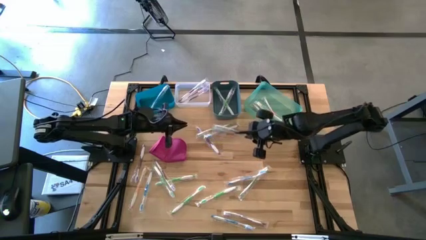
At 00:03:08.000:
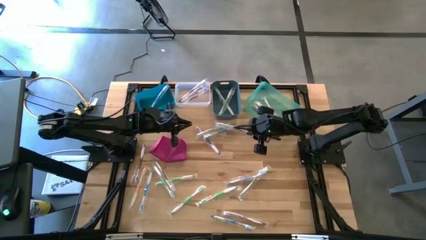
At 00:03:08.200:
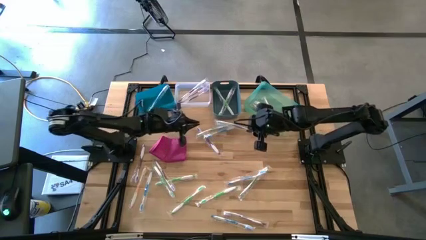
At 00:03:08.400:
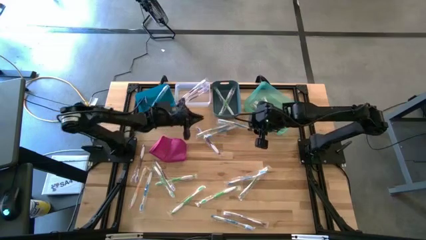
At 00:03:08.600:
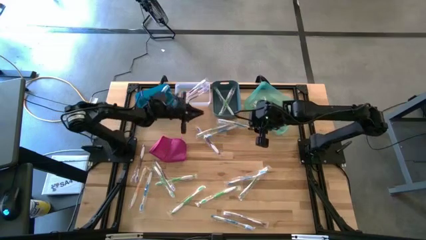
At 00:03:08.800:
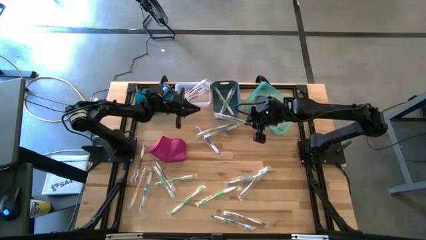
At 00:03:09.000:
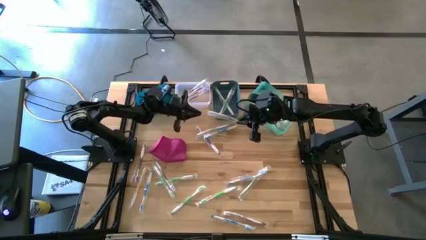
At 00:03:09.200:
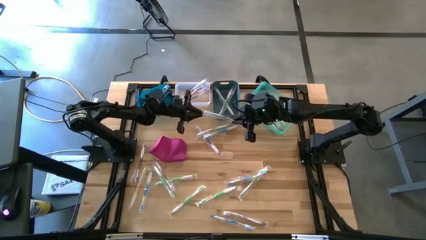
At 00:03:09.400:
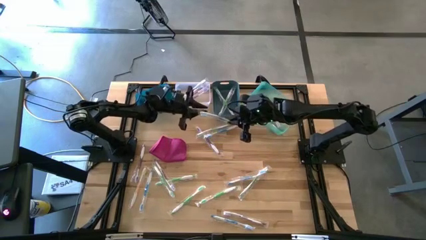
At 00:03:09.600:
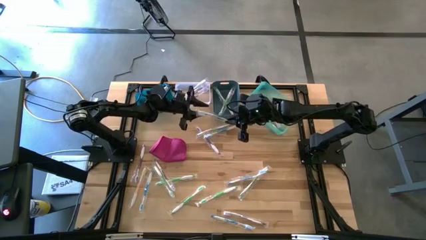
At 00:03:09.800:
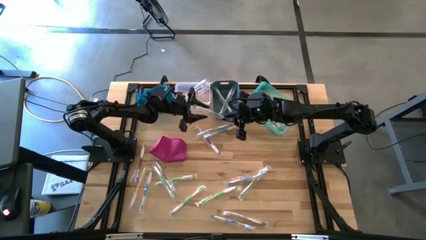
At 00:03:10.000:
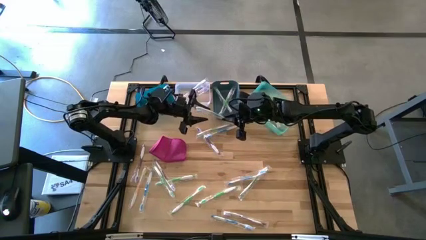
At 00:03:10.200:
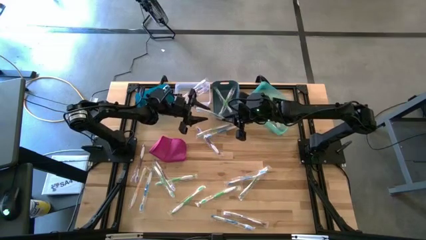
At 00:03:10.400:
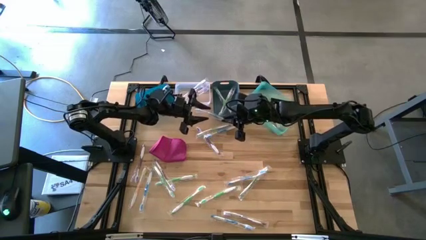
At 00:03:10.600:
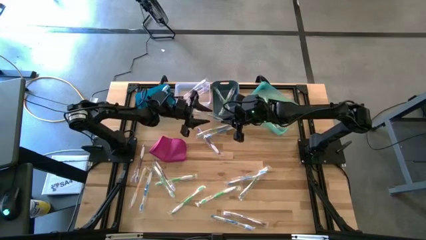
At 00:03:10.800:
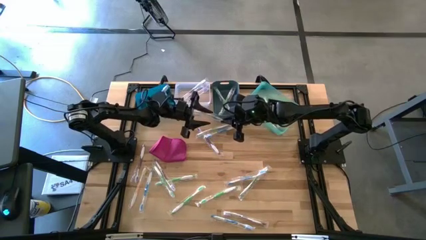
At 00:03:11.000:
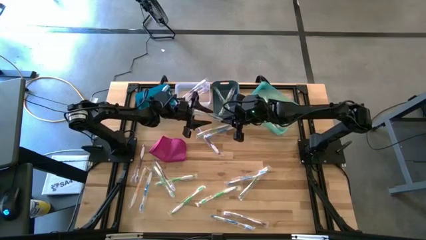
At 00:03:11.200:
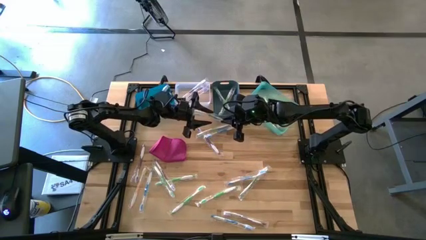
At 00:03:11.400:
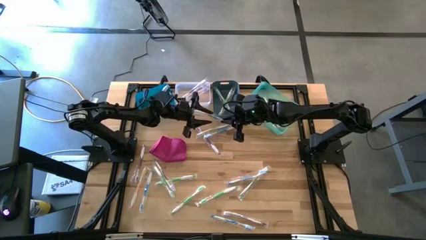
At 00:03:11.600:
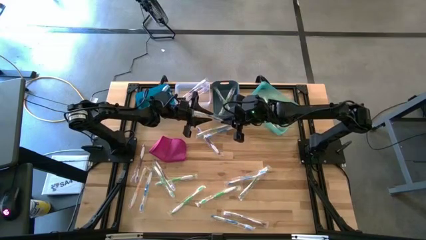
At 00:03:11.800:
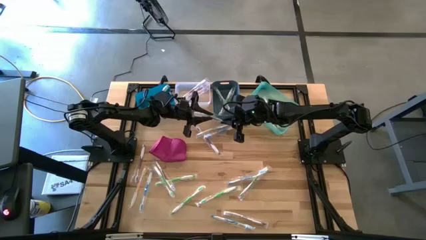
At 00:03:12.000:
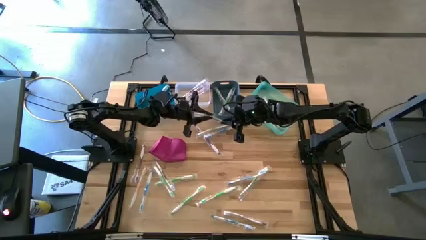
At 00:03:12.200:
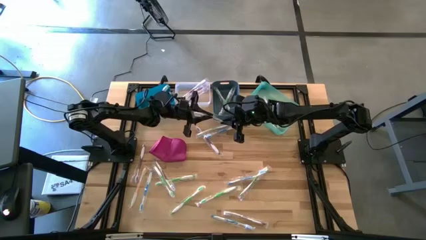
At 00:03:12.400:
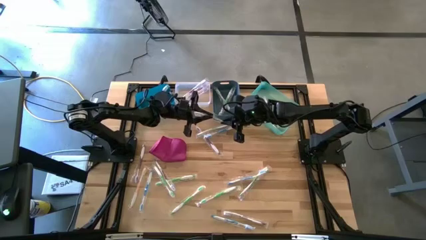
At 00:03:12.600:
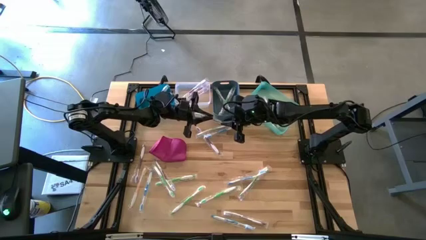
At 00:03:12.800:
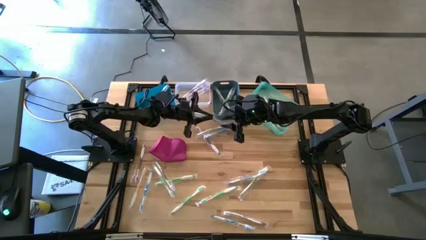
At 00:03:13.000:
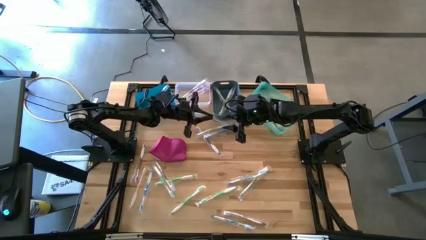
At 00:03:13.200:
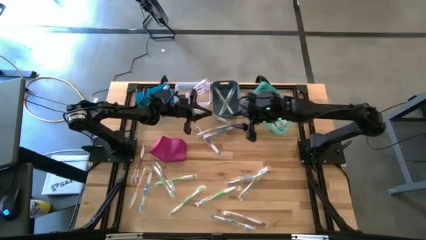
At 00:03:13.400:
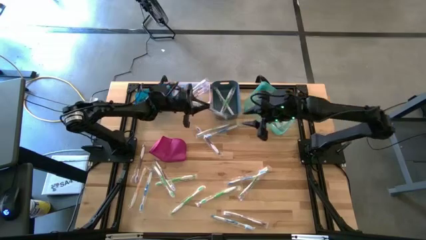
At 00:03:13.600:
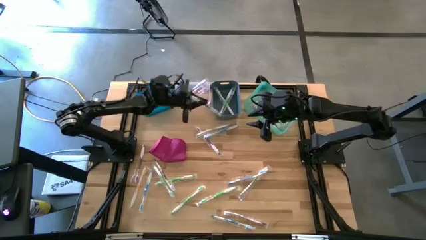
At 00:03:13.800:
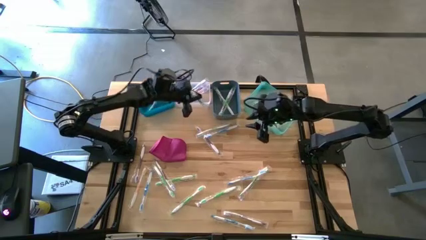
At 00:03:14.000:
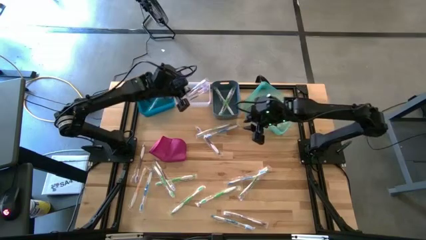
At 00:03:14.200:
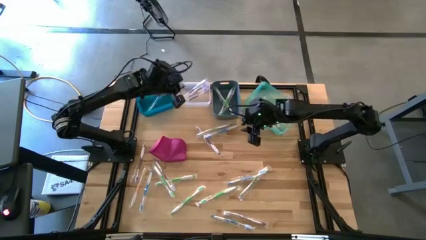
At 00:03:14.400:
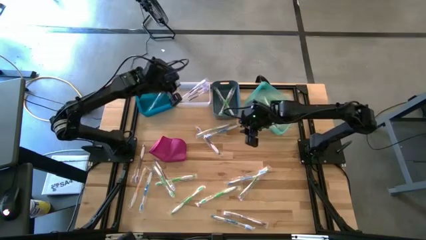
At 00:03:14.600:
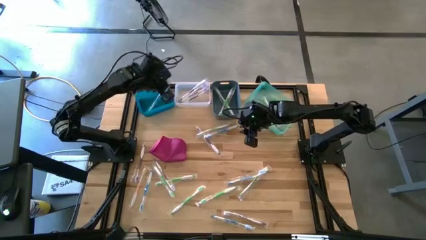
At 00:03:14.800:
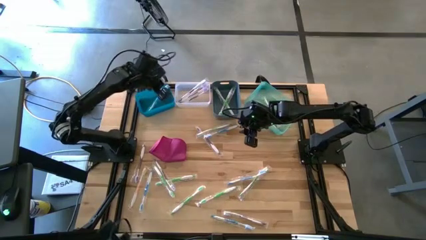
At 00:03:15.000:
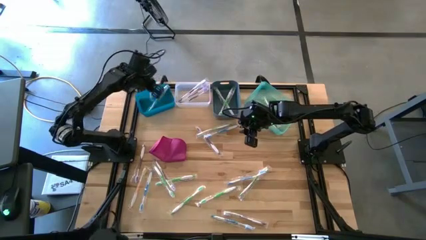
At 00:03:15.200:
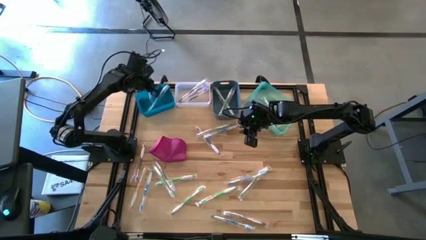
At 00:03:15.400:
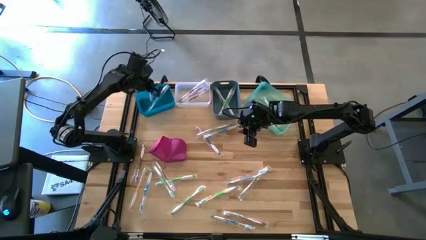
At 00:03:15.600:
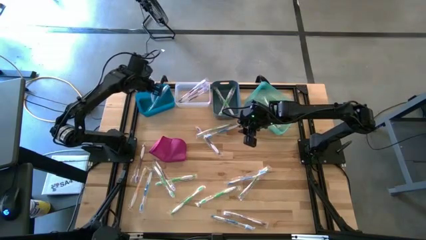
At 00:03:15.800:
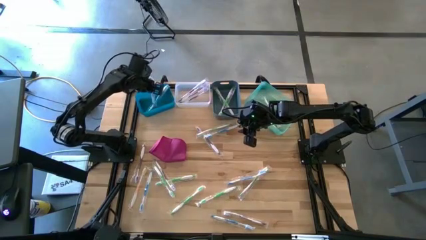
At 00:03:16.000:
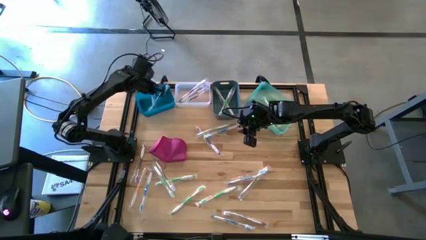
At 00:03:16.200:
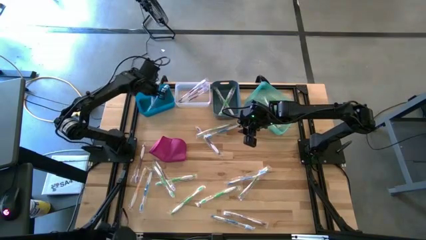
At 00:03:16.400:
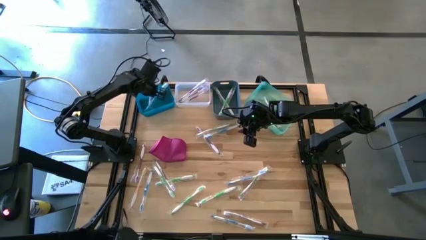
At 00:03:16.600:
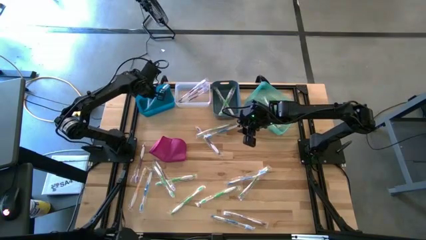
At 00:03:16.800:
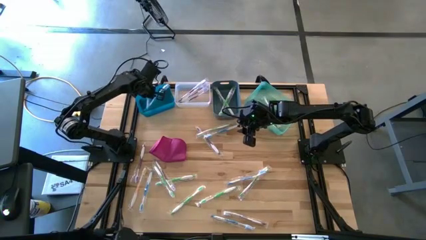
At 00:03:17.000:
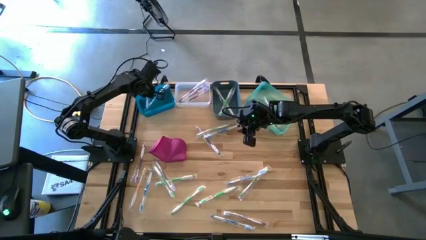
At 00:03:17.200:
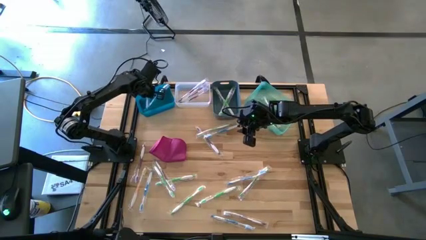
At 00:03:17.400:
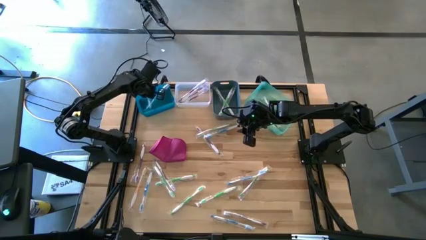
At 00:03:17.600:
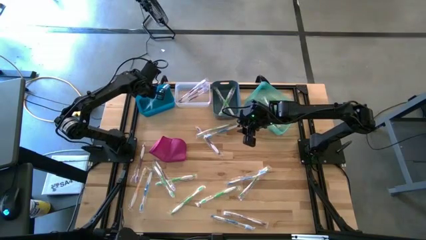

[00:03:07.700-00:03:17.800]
Task: Pick & Place Toothbrushes
Put the blue toothbrush into the blue bin

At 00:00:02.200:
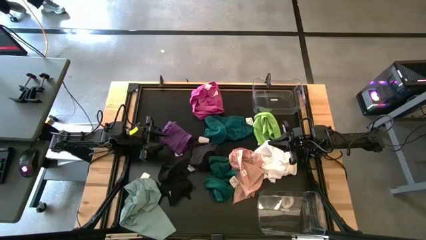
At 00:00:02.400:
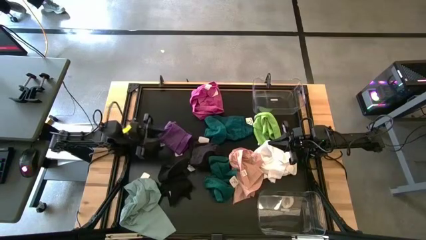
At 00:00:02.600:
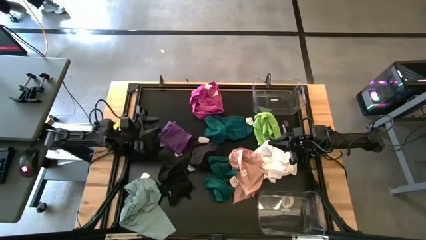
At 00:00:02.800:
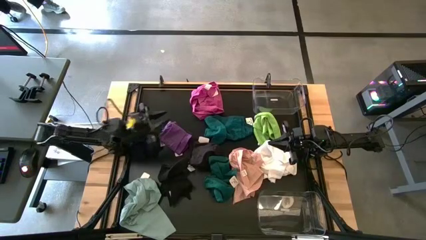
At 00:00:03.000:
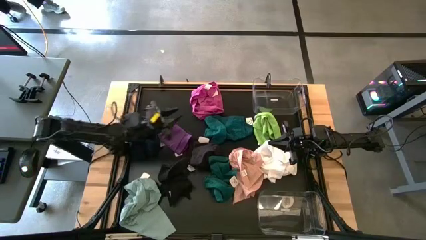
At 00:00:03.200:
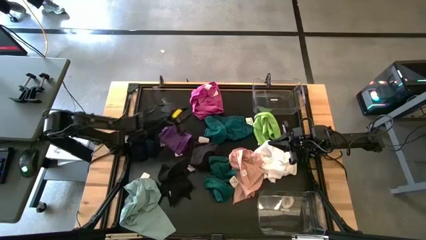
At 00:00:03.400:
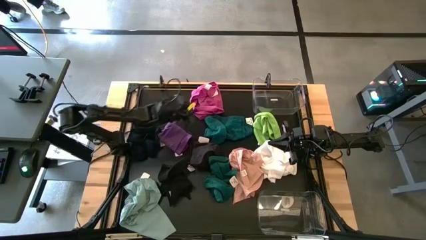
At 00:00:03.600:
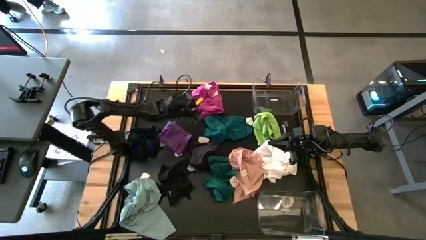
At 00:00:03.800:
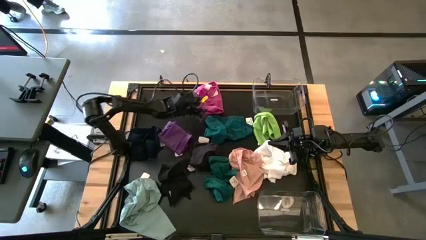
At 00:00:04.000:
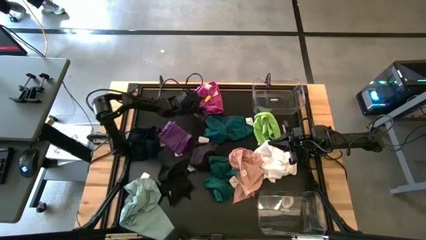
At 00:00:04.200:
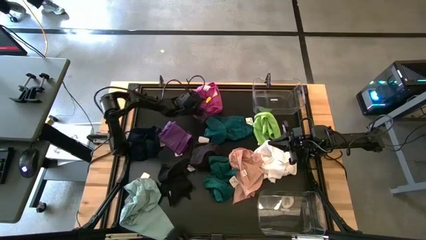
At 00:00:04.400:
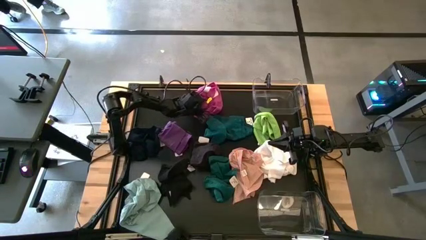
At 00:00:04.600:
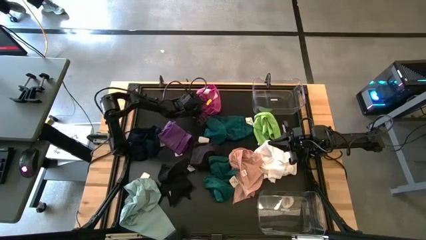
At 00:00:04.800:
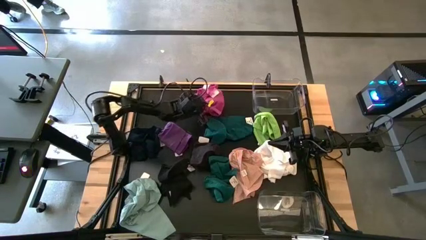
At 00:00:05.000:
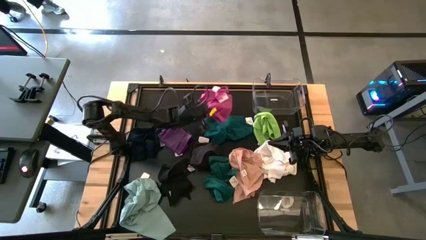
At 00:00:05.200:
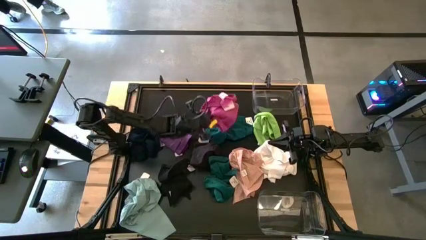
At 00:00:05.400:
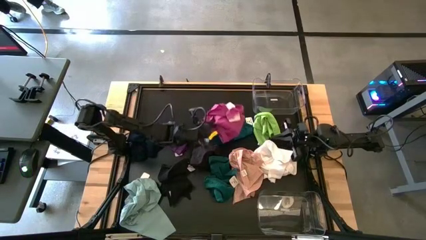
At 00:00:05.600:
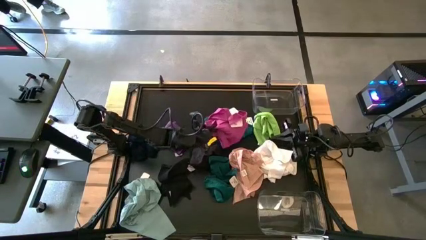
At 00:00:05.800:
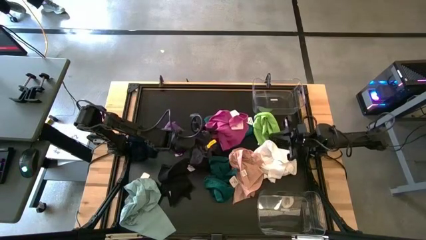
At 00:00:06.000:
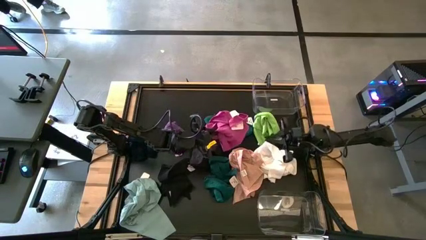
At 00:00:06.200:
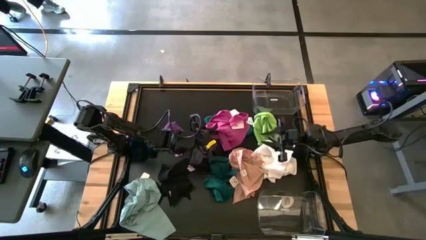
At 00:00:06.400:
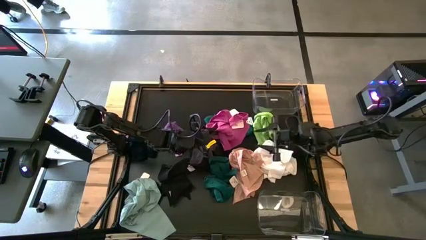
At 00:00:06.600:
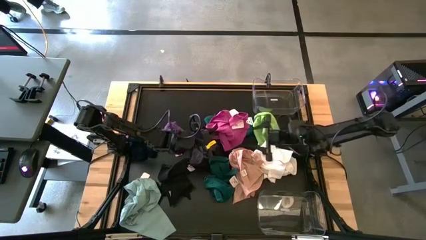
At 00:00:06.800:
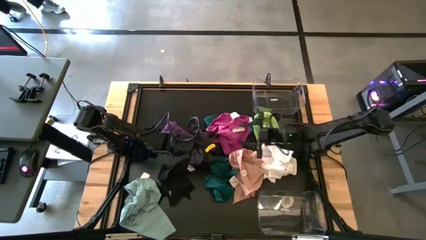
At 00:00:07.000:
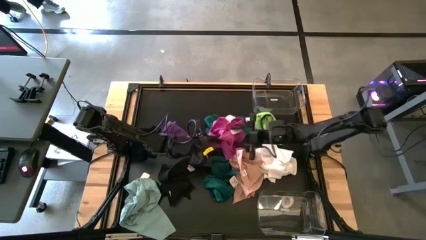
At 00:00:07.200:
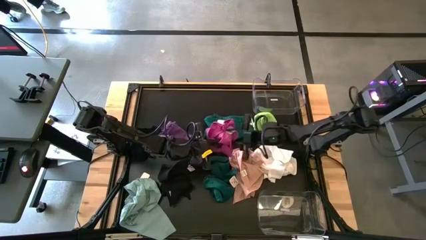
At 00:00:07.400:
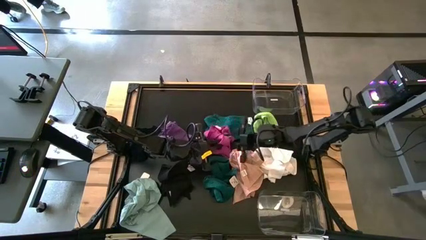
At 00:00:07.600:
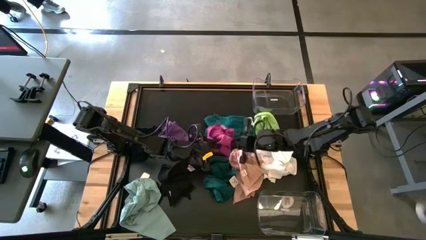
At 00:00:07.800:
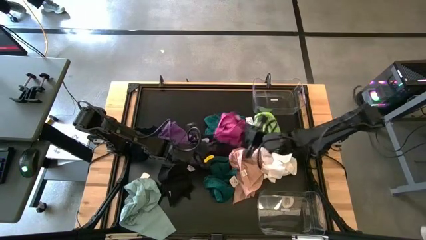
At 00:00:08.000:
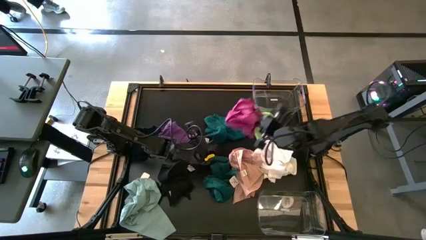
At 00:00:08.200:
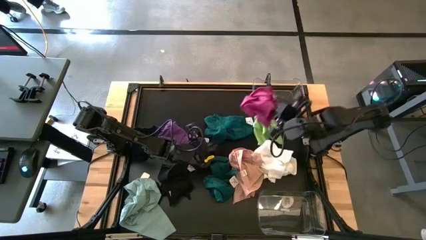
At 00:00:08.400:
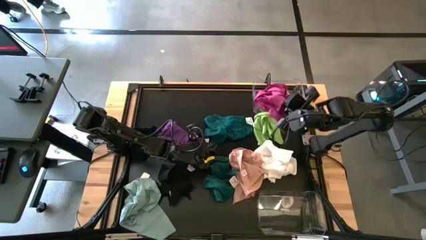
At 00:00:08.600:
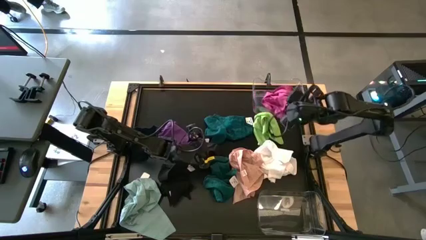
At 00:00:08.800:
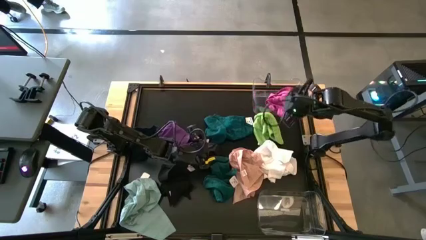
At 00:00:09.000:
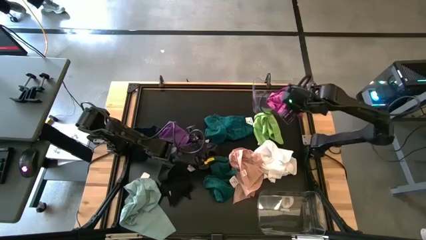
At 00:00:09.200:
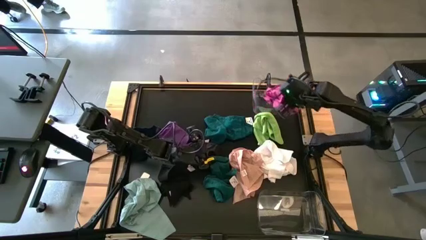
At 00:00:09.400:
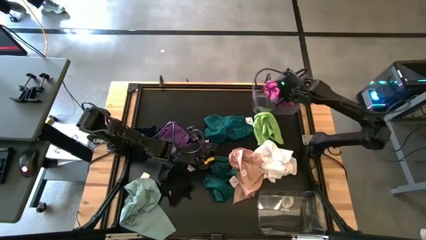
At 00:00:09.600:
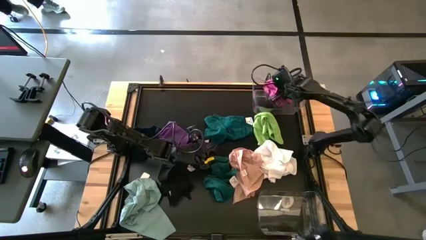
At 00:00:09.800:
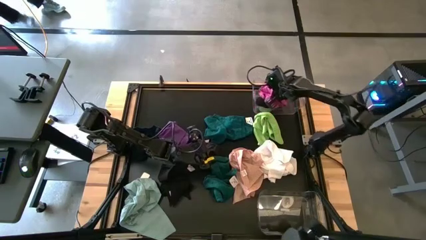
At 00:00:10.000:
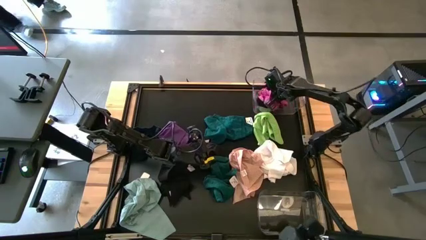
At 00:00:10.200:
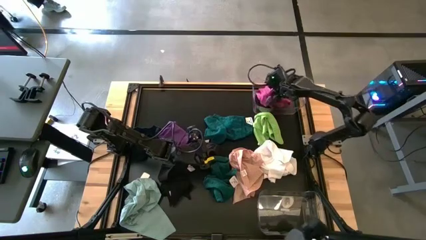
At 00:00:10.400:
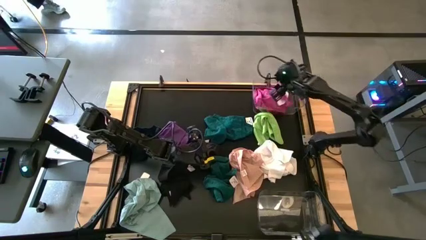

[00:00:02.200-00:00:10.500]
Task: Sort towels by color in basket
Put the pink towel into the top transparent bin
